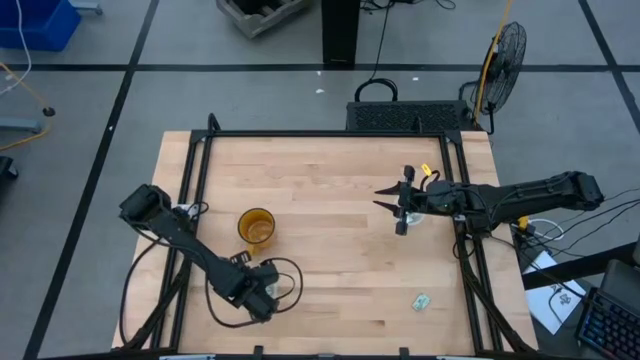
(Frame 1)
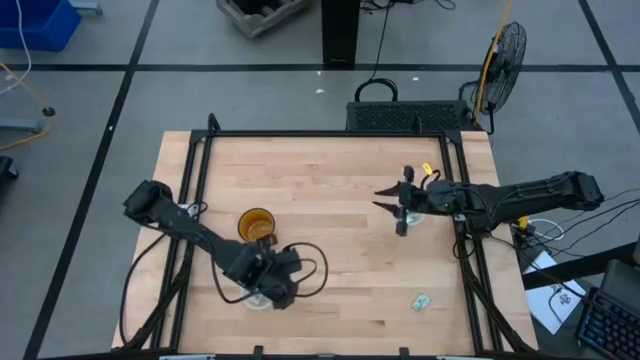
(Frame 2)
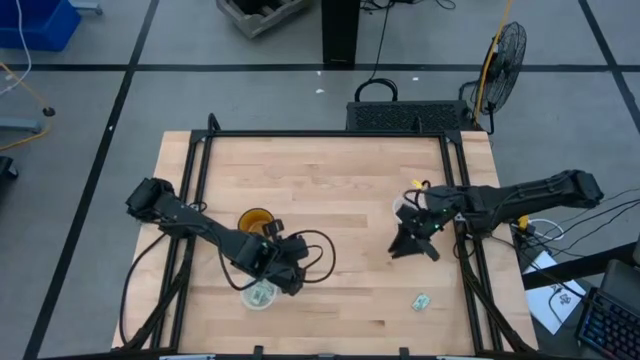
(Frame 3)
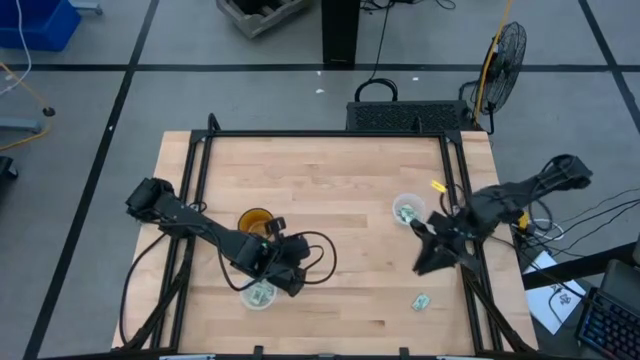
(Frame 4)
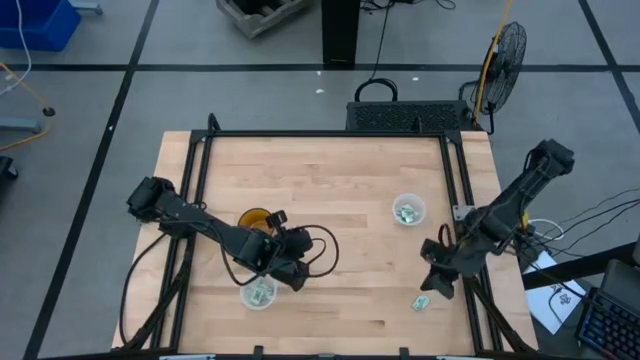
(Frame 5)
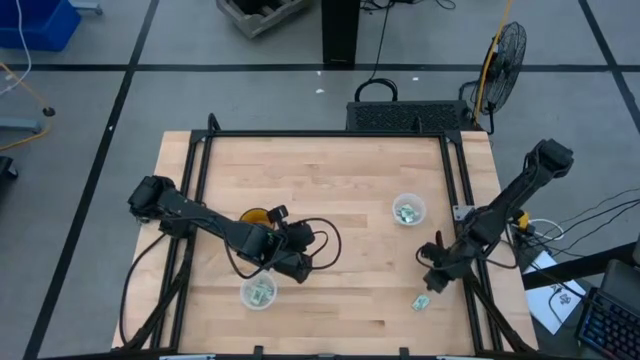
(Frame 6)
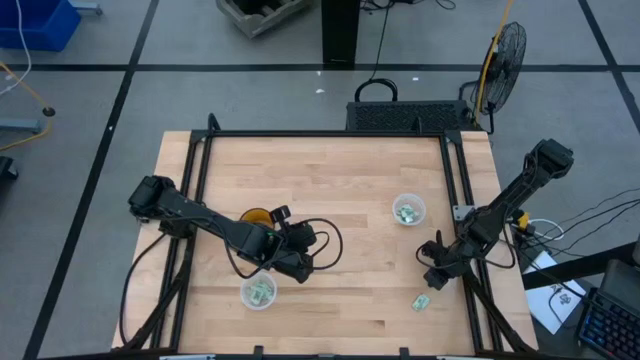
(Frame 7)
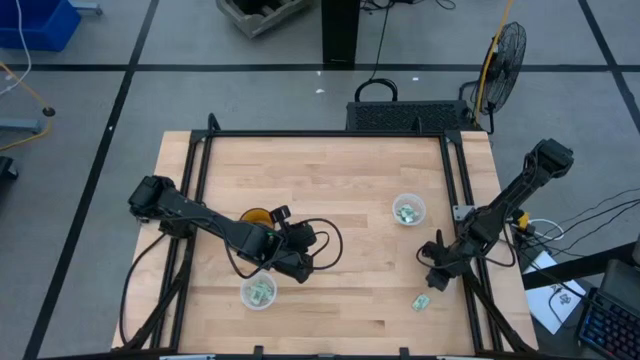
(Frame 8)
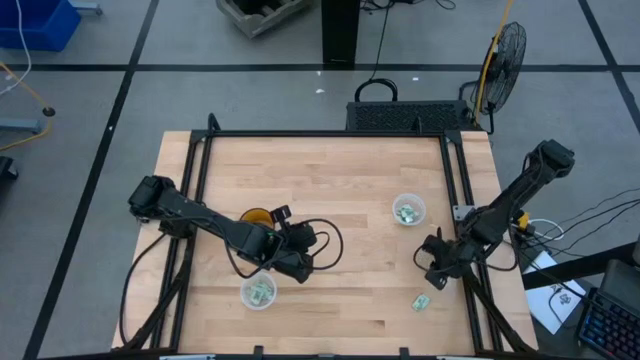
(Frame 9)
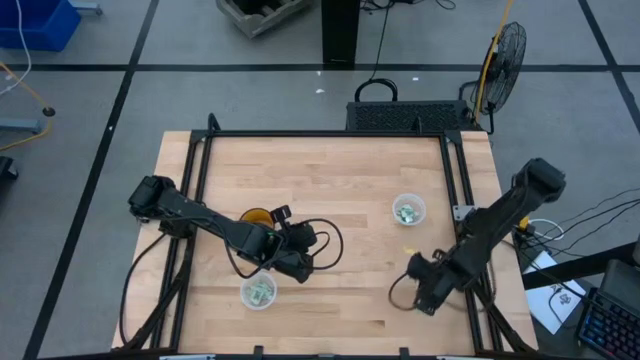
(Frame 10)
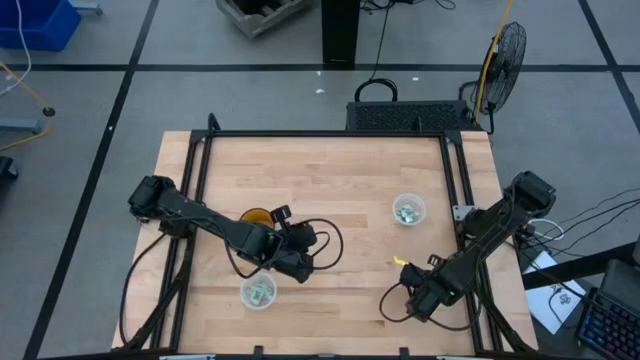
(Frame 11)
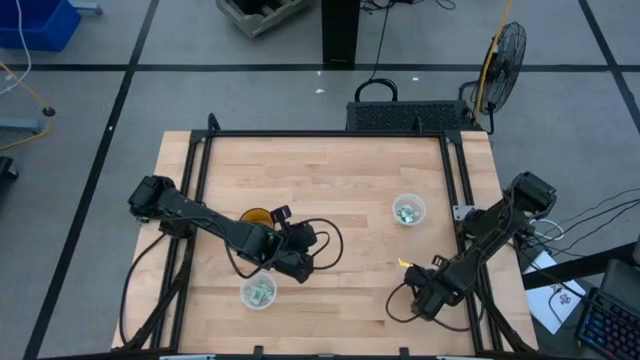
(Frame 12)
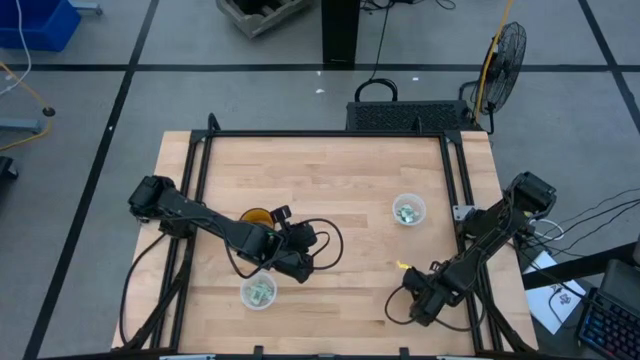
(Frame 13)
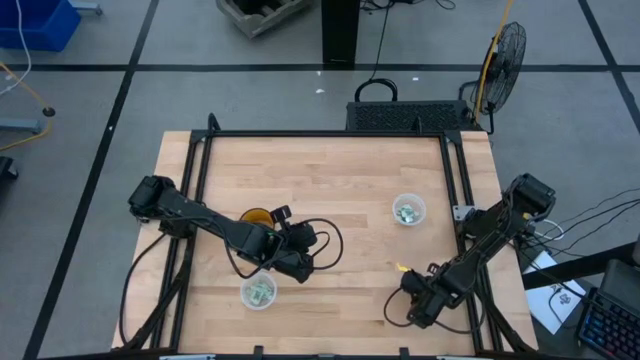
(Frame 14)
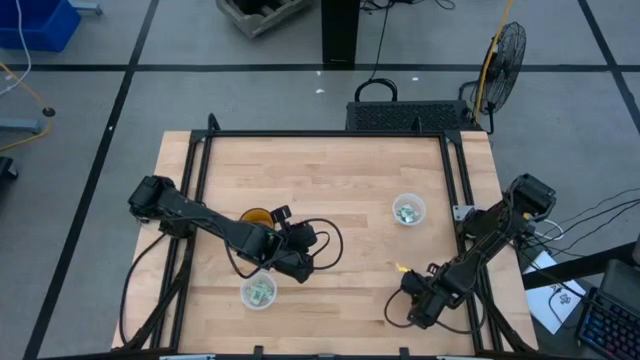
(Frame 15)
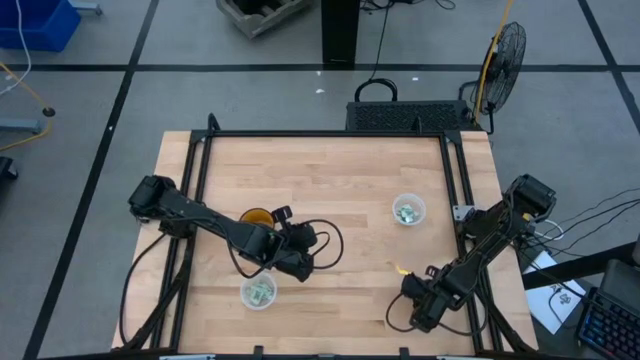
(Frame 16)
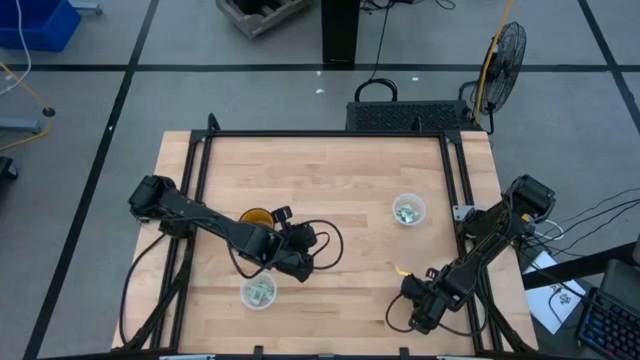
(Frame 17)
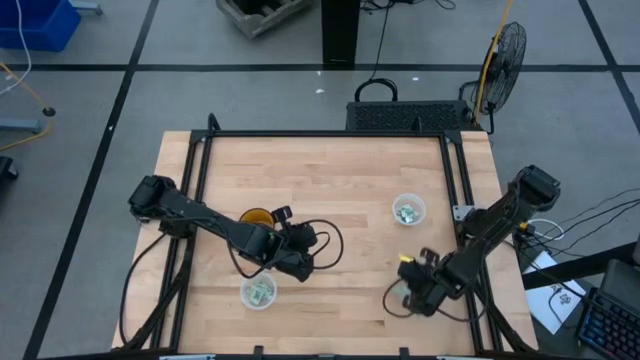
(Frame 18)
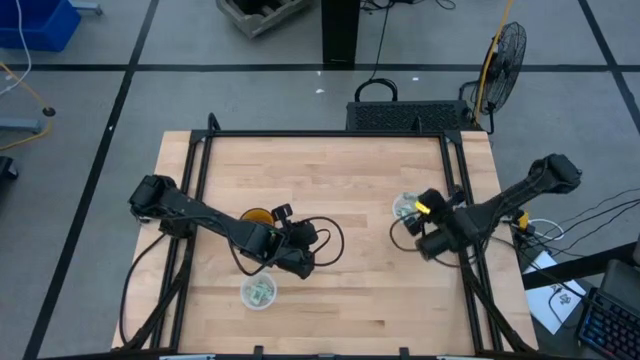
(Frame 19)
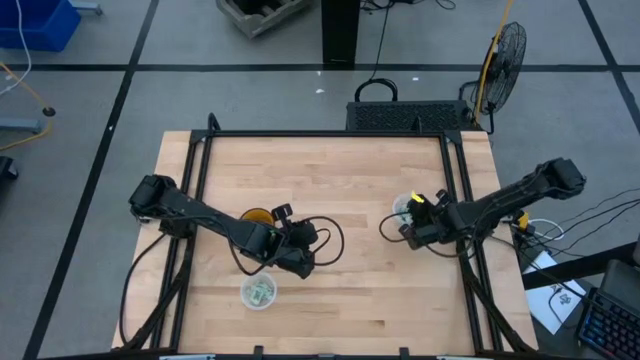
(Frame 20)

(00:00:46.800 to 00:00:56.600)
Task: Pick and place Stevia / Truvia into bins
Put the stevia packet into the top transparent container

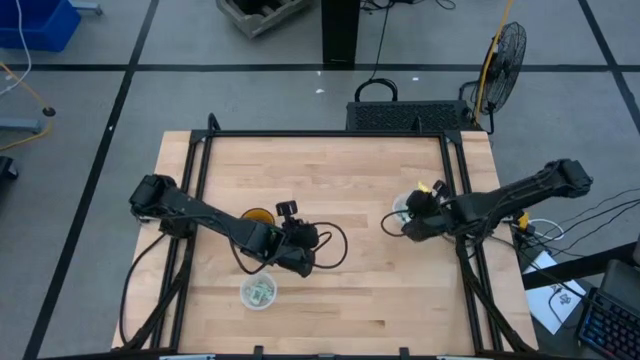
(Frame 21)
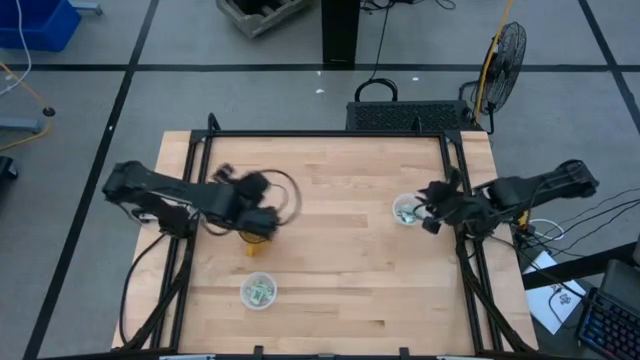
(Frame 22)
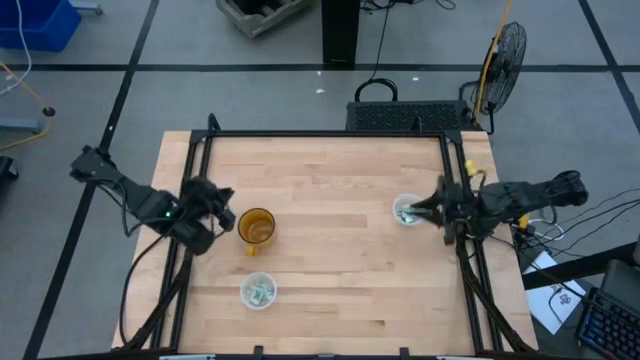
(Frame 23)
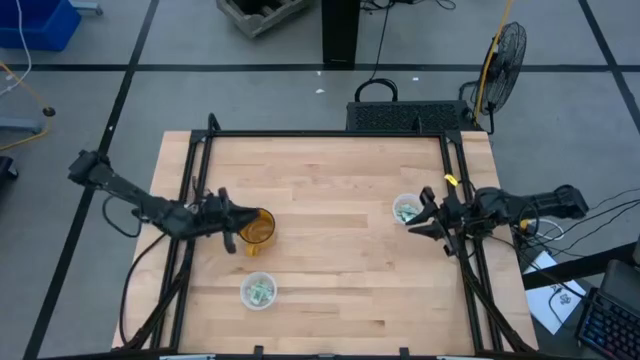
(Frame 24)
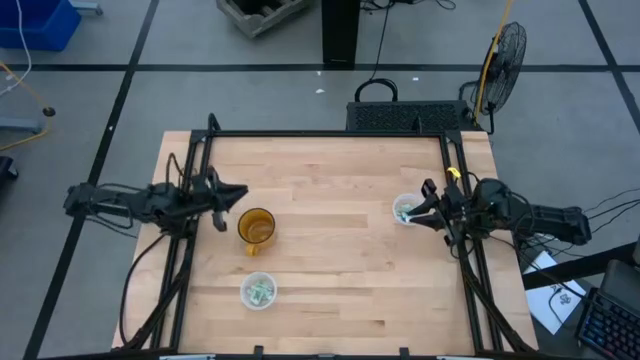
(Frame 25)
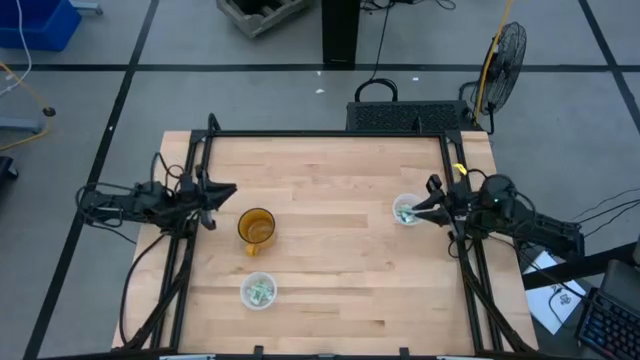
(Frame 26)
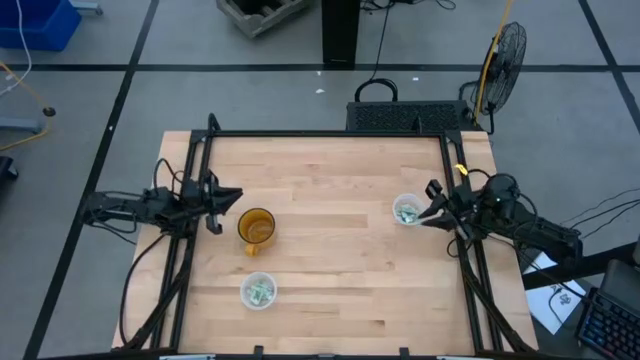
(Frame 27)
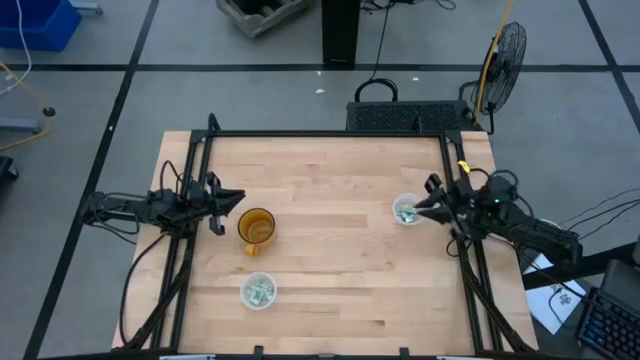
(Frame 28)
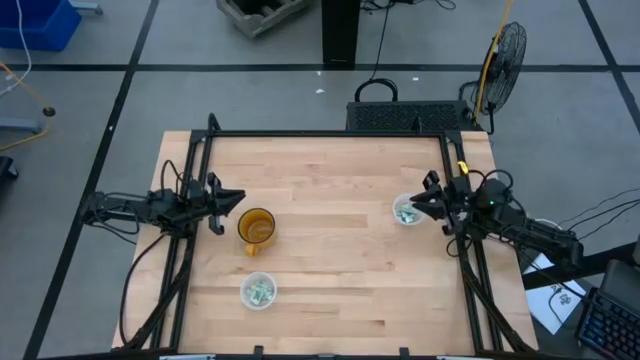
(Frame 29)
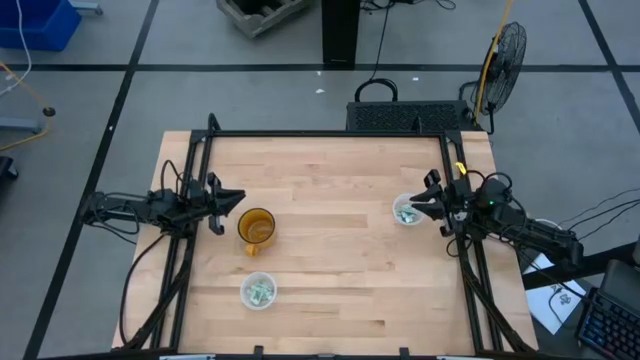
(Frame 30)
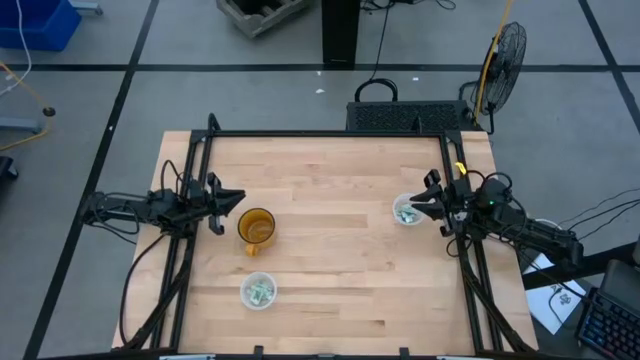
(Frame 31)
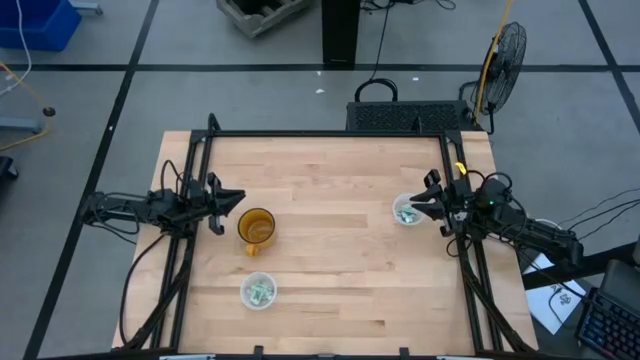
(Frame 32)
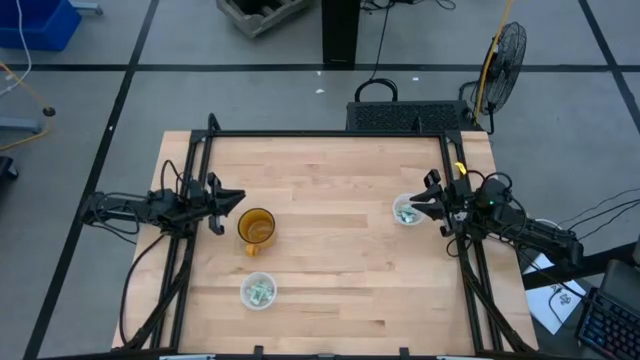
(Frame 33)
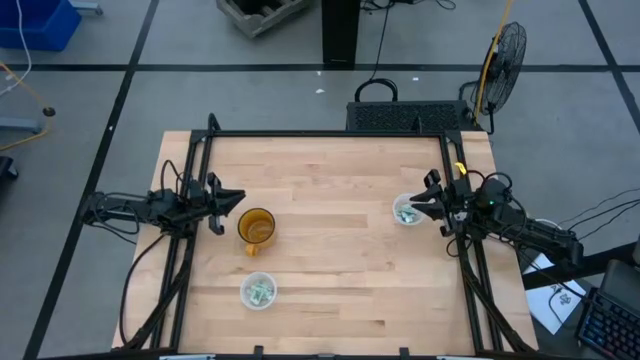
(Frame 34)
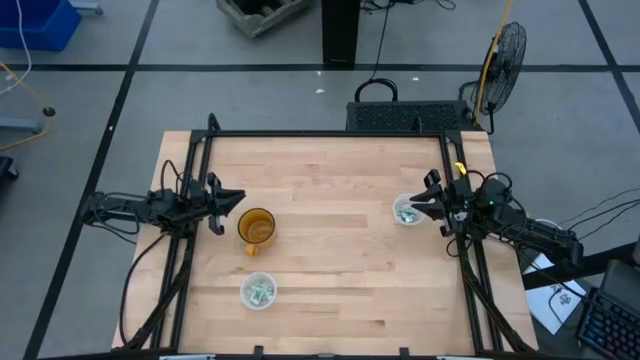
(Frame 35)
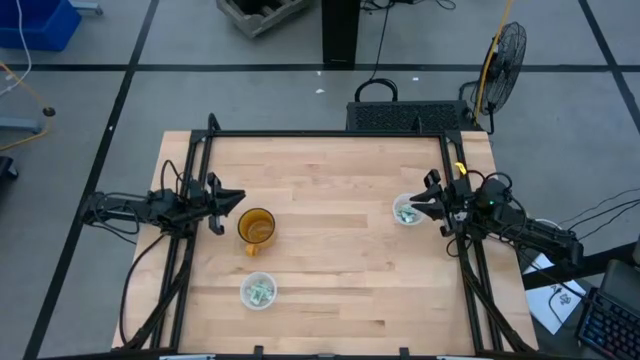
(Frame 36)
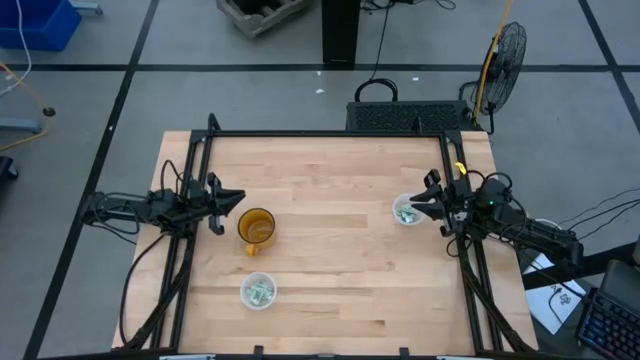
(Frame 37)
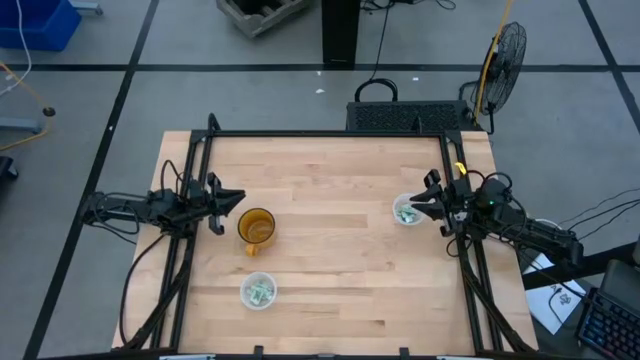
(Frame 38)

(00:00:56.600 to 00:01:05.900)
Return to Home Position

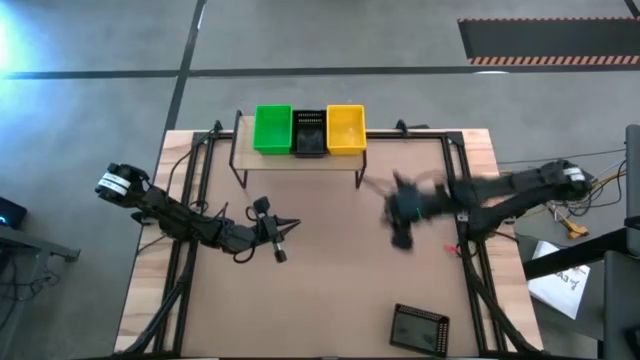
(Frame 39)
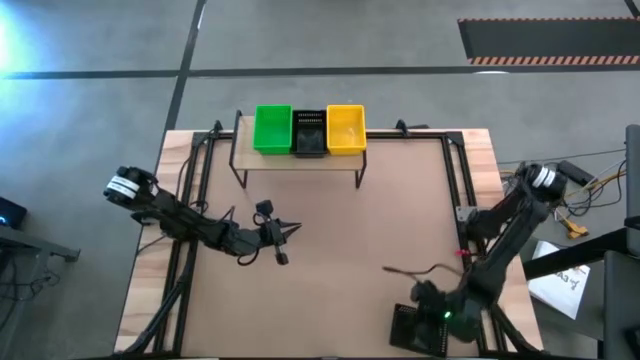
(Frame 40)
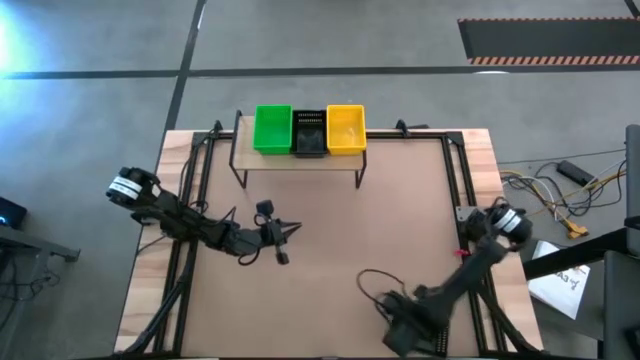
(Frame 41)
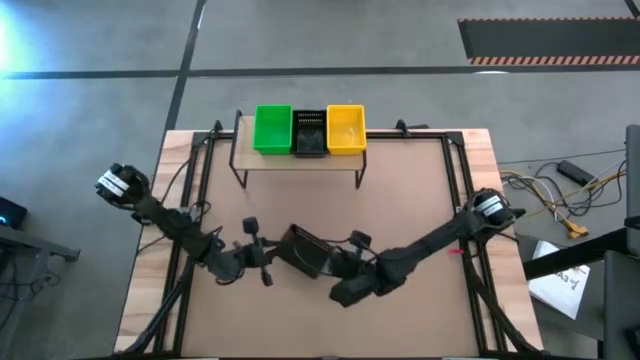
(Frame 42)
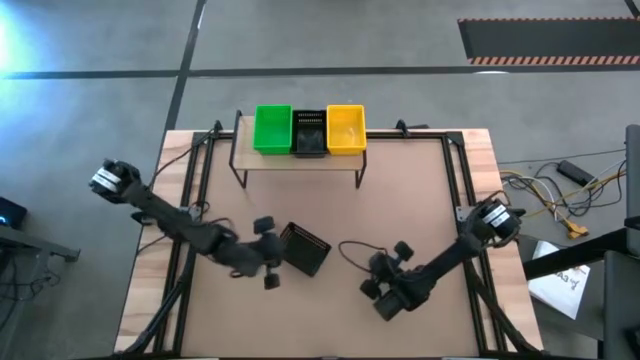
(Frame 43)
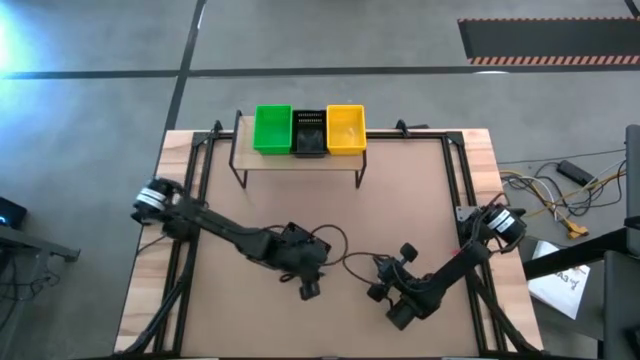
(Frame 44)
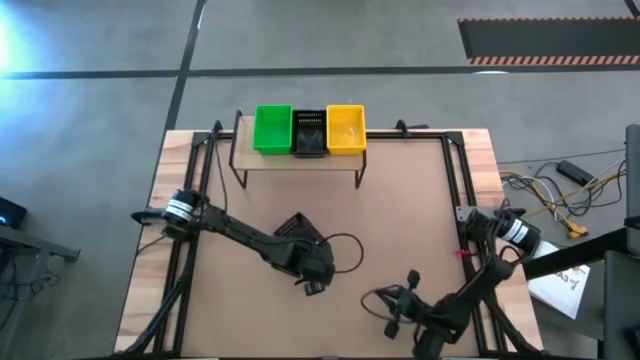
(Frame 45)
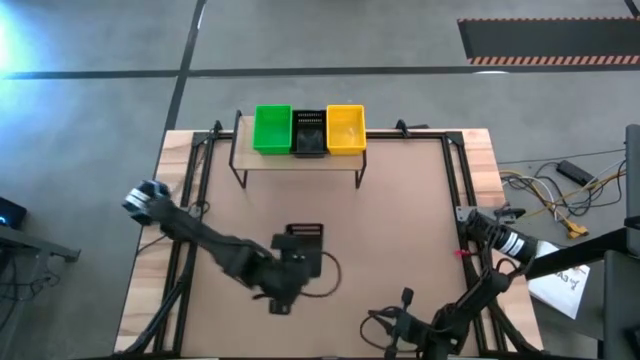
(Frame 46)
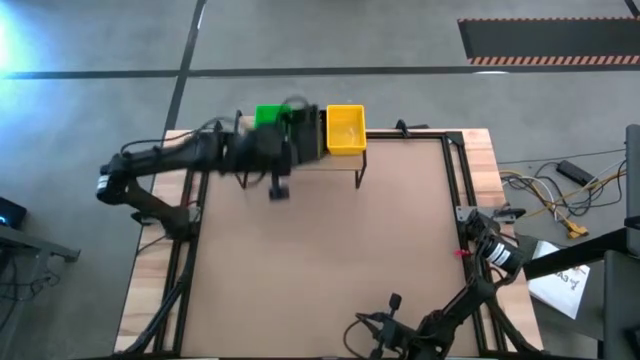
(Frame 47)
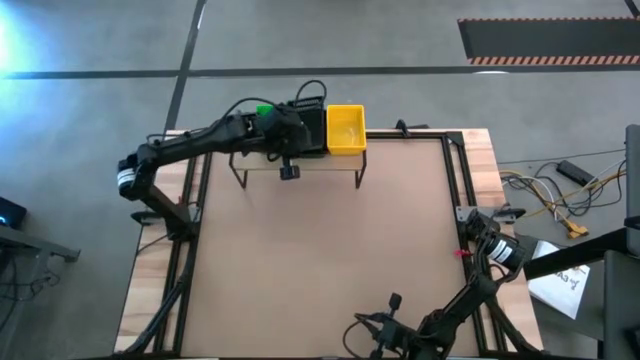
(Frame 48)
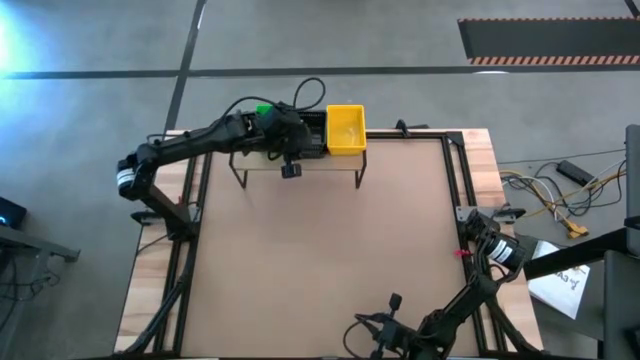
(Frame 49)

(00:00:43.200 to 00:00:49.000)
Task: Stack baskets on shelf by color
Stack the black bin on the black bin on the shelf
